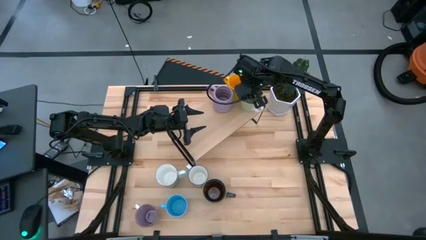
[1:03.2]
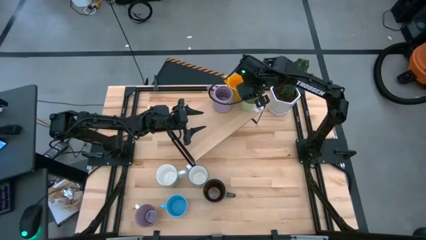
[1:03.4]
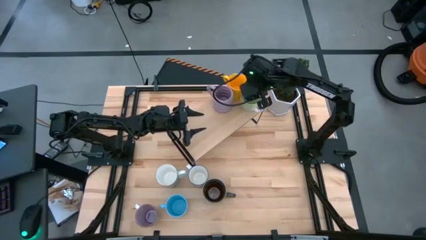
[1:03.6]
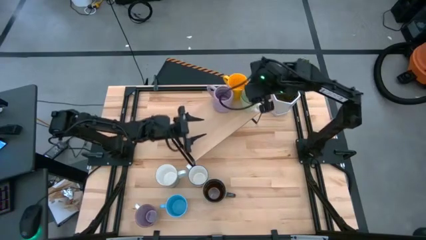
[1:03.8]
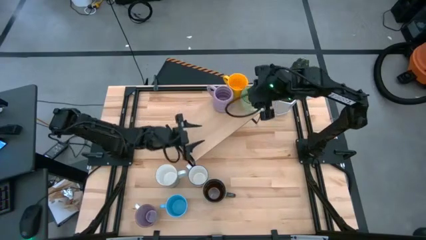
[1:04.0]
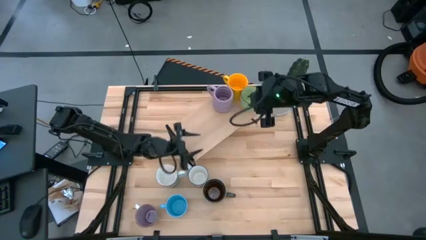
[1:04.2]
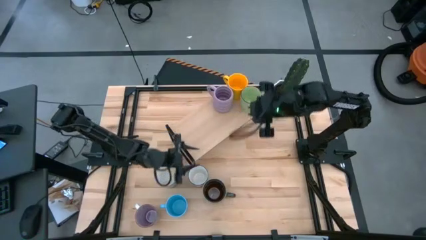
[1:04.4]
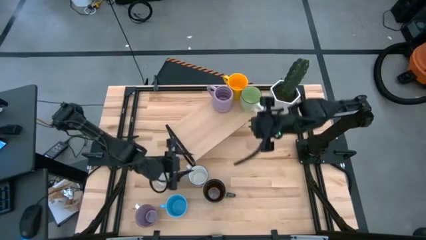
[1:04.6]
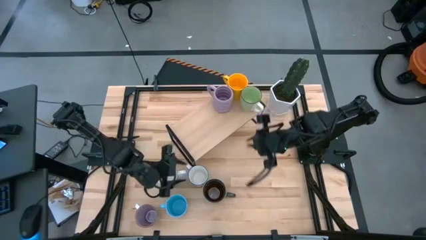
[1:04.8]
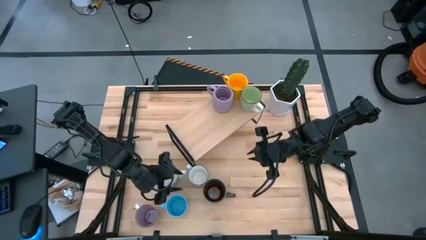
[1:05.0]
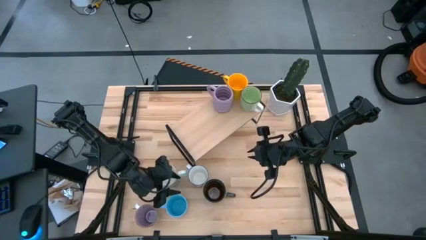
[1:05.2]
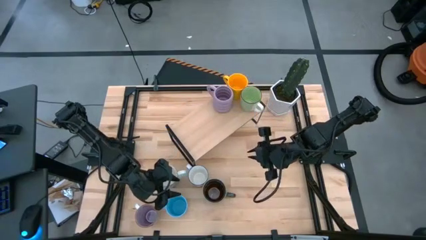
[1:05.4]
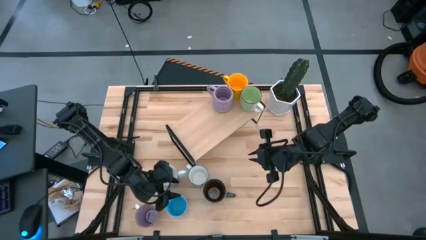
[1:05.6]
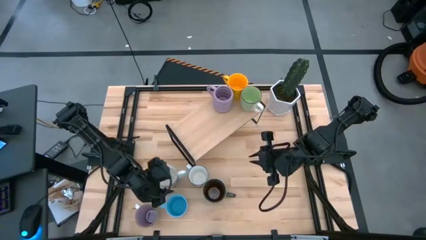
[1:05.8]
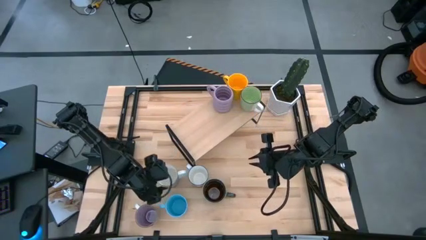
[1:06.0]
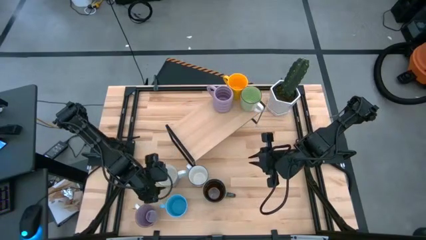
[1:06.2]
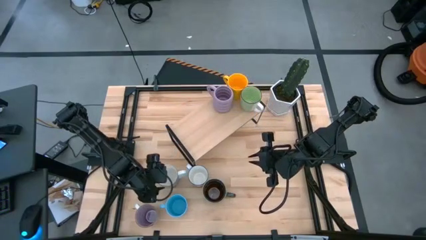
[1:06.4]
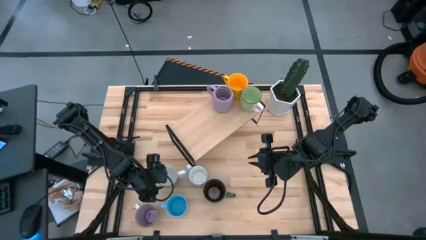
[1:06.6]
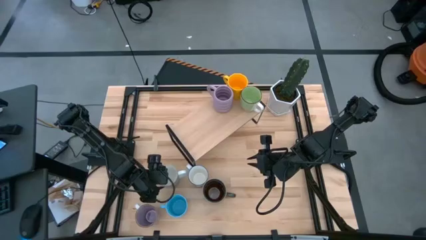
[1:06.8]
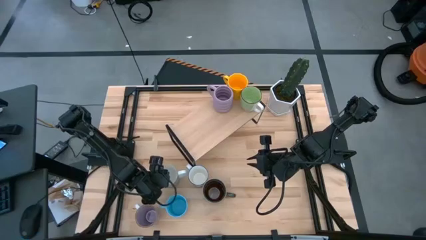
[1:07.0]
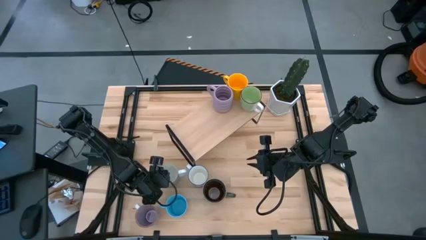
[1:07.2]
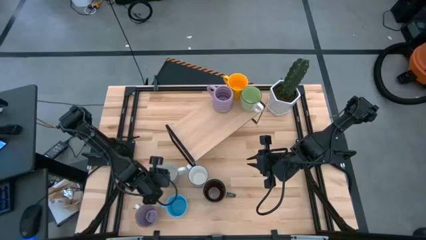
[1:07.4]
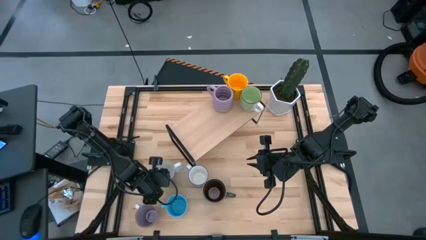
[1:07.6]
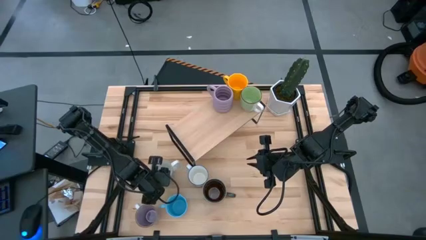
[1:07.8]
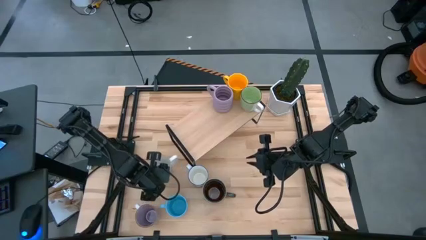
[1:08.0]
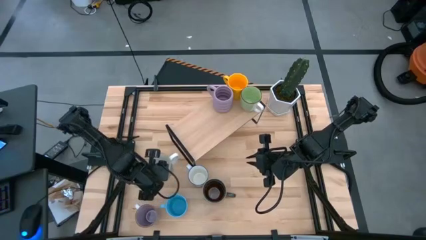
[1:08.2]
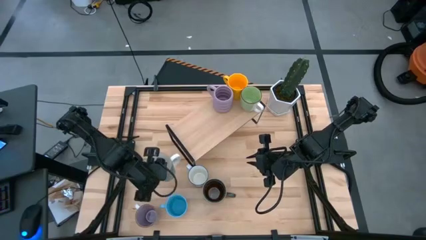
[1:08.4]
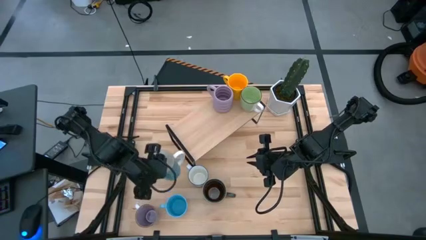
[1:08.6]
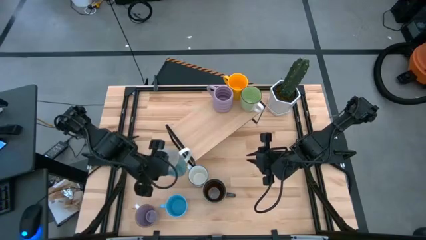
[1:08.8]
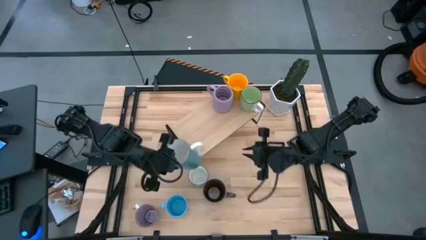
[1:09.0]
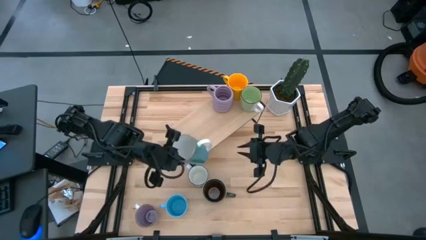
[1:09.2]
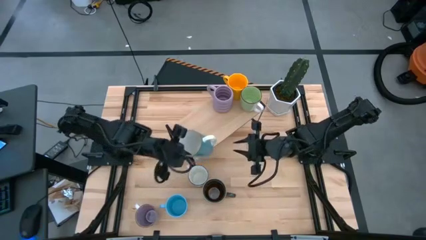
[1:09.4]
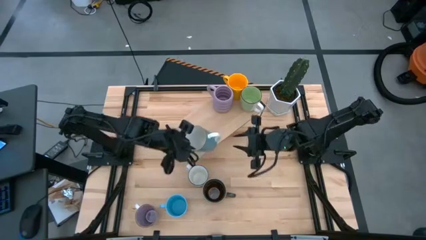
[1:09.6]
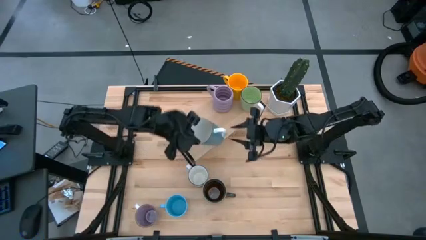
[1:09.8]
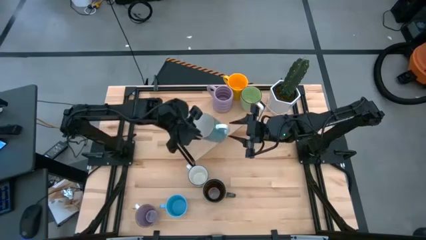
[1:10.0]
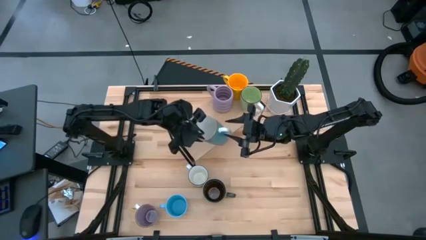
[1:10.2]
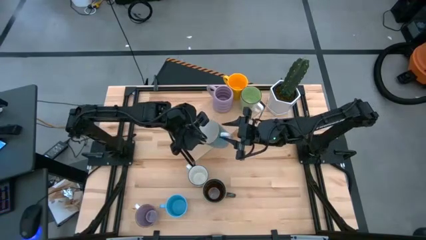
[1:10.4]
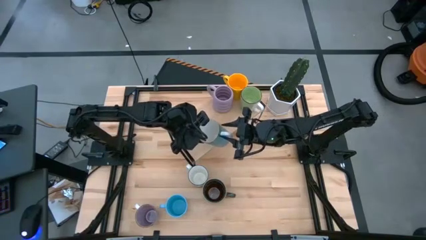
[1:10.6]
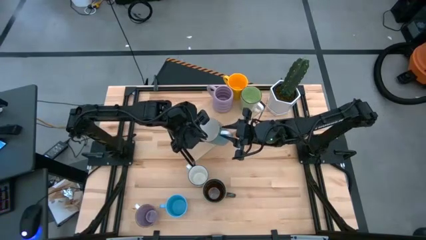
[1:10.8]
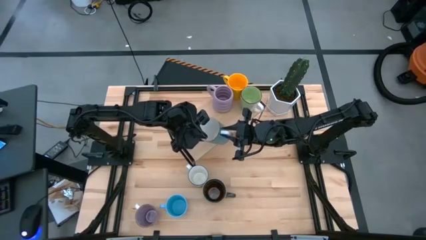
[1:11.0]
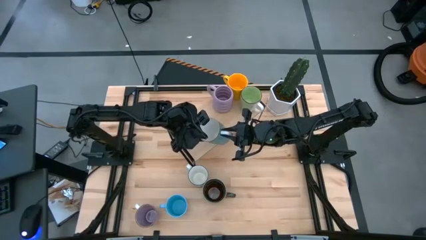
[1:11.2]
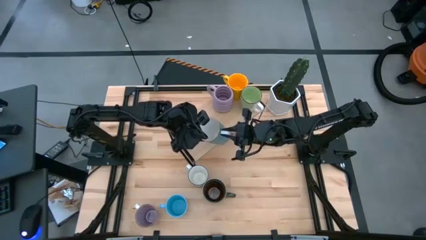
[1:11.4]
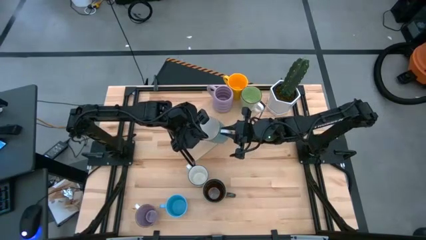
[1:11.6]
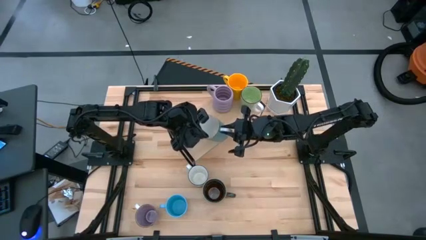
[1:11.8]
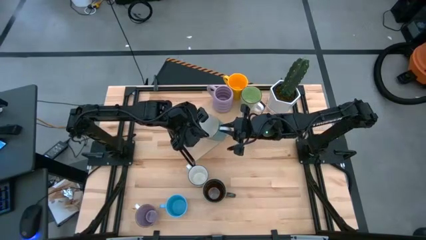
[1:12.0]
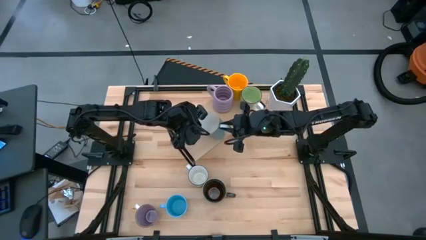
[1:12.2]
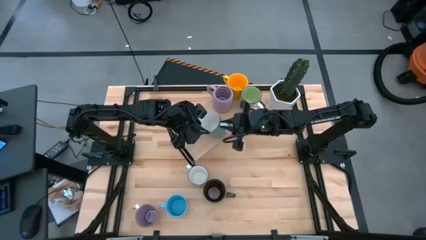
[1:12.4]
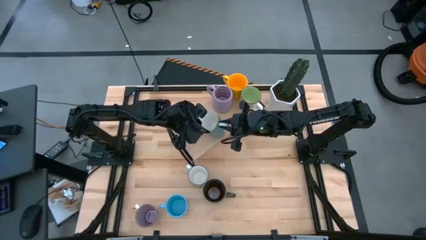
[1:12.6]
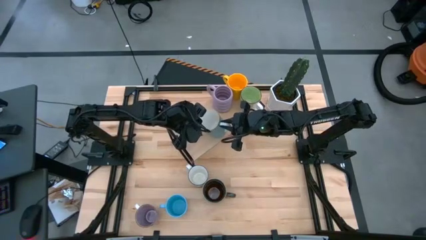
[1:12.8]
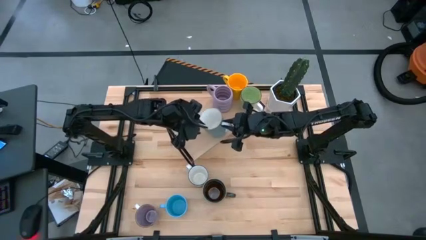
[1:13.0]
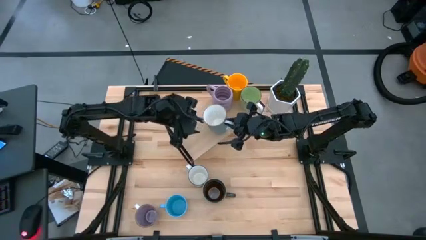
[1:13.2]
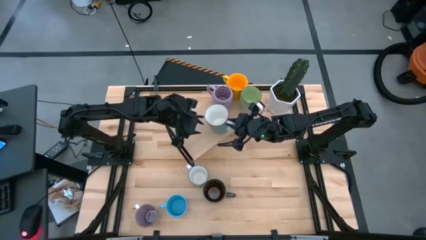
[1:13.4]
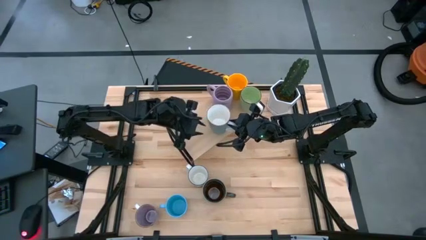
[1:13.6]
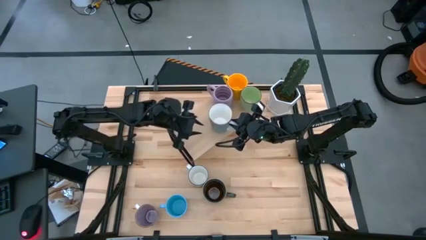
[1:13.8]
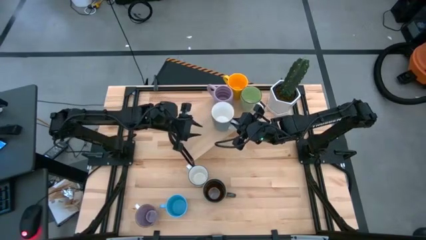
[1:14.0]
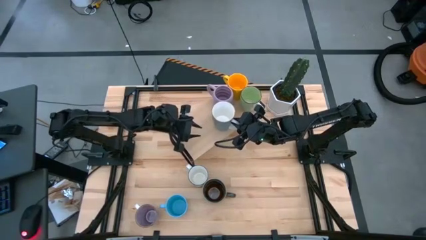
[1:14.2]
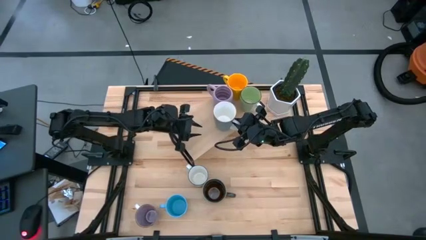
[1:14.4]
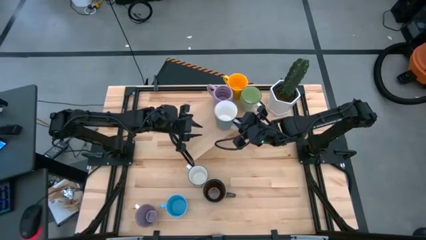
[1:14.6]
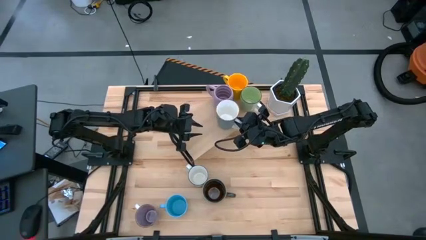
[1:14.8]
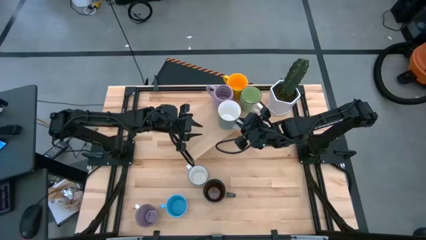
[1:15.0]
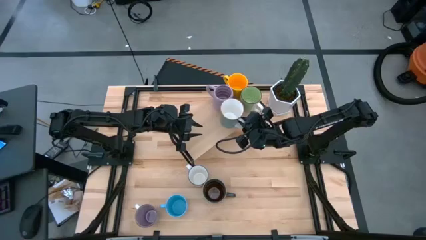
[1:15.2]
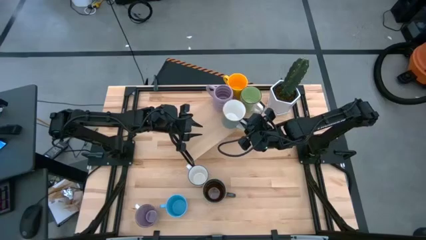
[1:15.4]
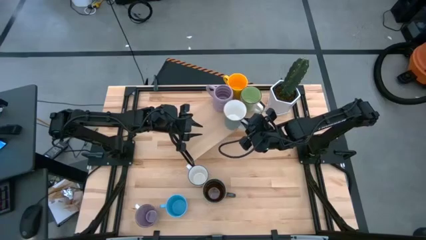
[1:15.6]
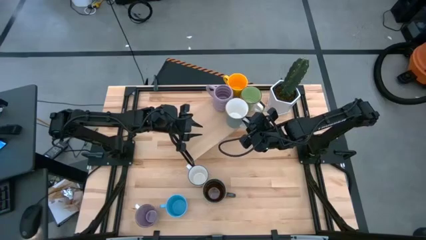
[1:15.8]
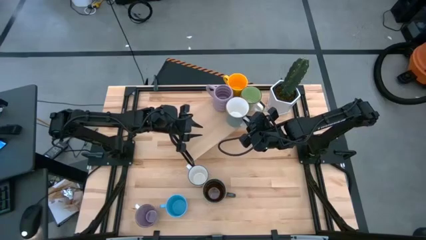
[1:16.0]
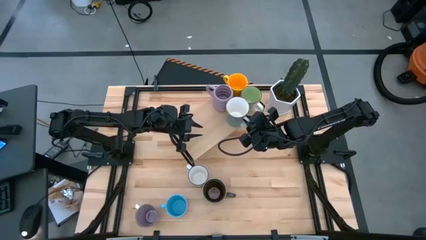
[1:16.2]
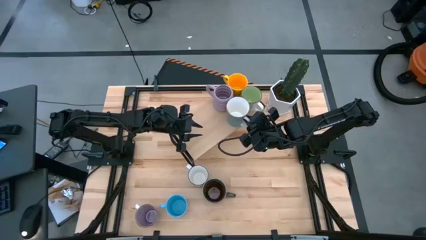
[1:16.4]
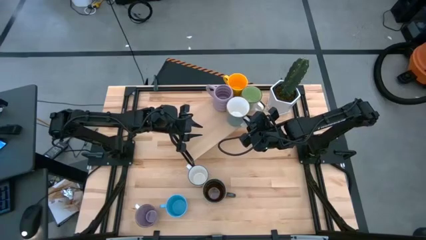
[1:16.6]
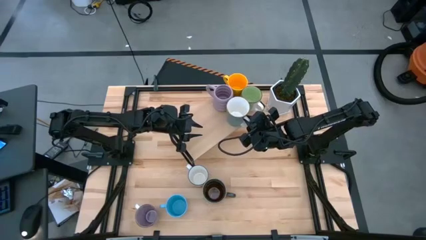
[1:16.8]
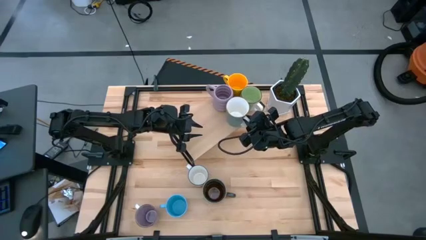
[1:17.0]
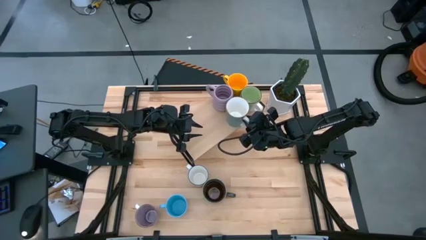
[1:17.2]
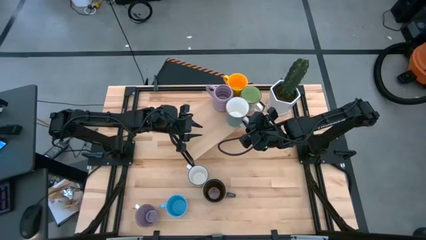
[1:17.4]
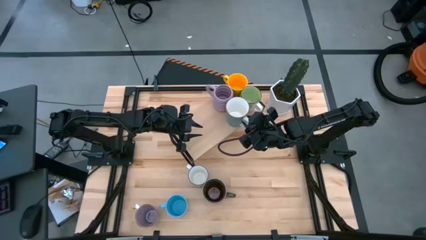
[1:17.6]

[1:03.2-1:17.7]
Task: Place coffee mugs
Put the blue mug on the shelf

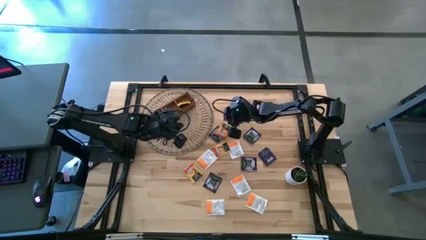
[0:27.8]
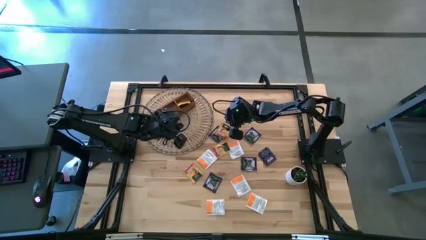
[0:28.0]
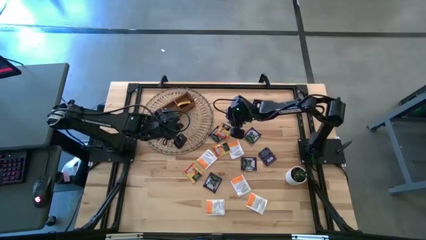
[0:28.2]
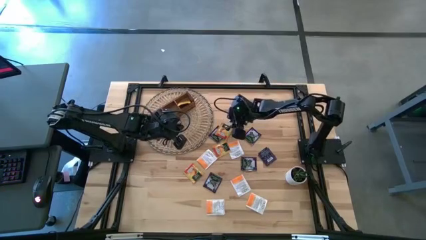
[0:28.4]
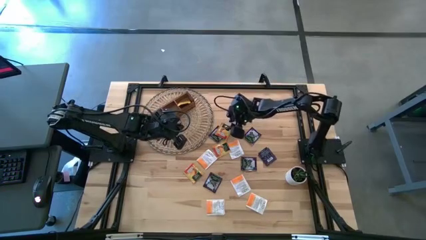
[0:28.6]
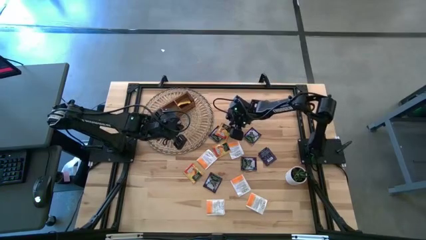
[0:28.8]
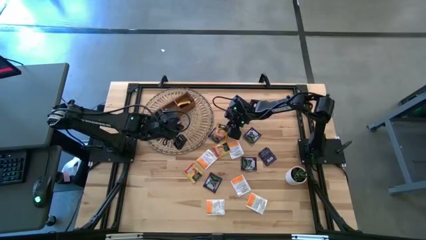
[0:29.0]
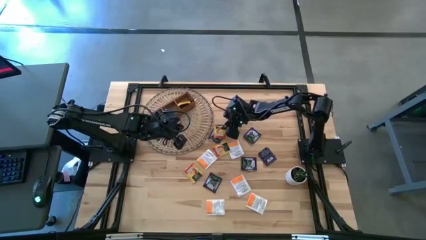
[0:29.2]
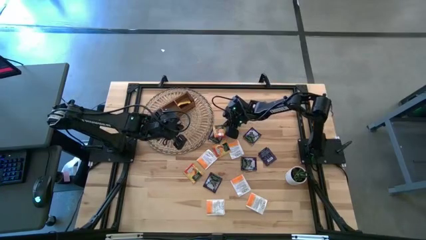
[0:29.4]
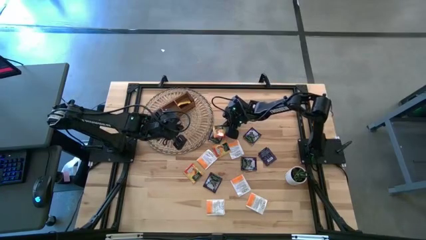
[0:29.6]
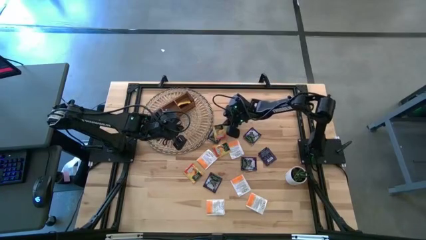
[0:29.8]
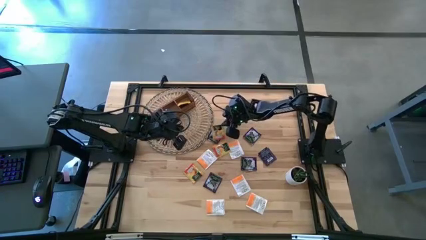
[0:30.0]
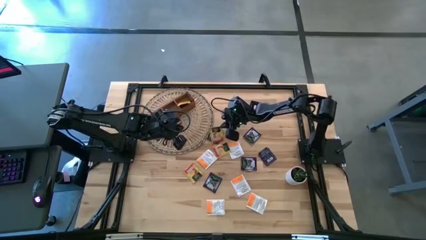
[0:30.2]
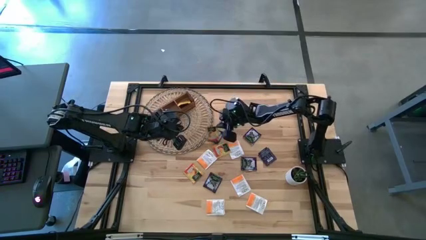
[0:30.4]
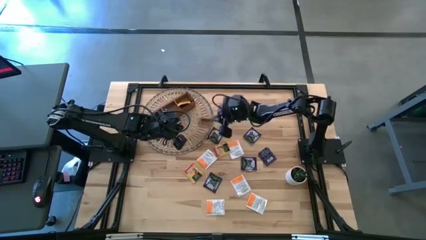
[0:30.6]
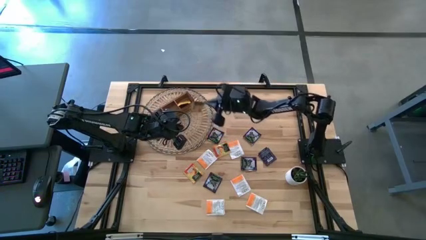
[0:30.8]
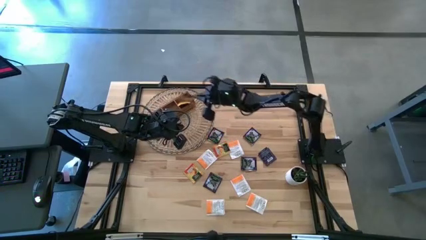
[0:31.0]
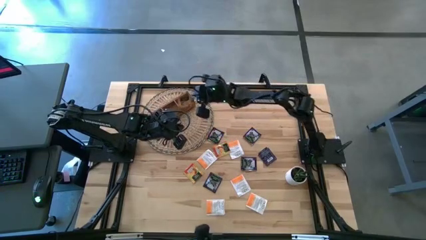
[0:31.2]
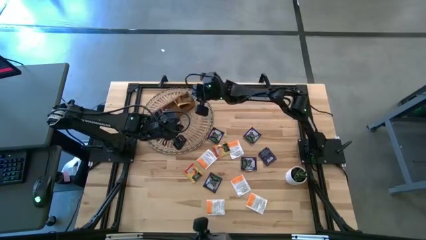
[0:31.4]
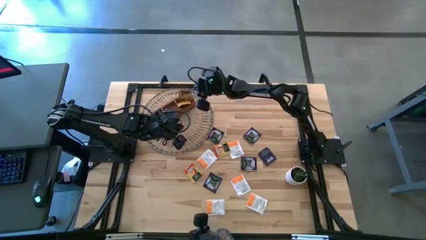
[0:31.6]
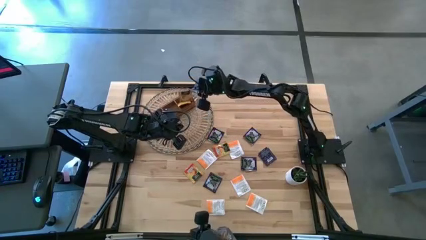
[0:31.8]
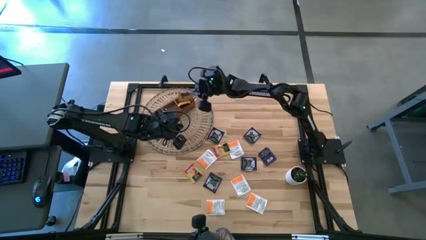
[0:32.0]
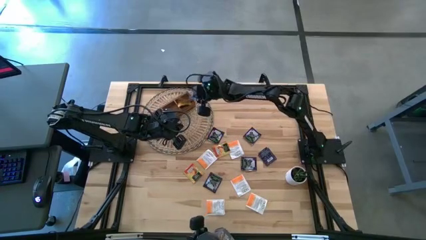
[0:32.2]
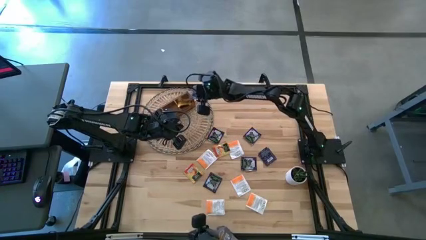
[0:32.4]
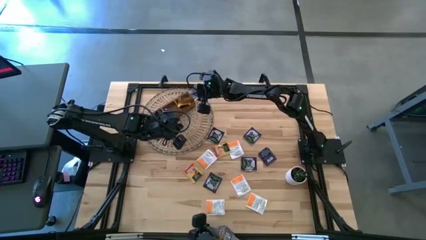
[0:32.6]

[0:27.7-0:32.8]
Task: Pick & Place Tea
Put the yellow tea bag into the right section of the wooden organizer
